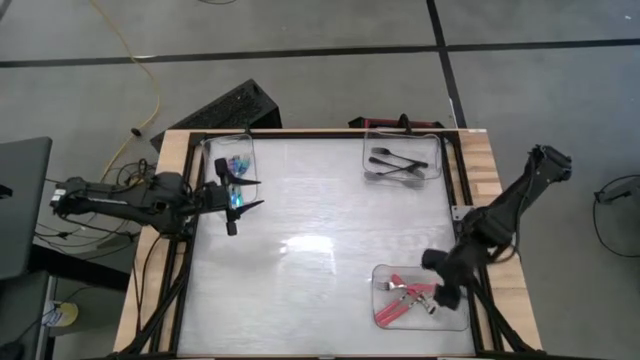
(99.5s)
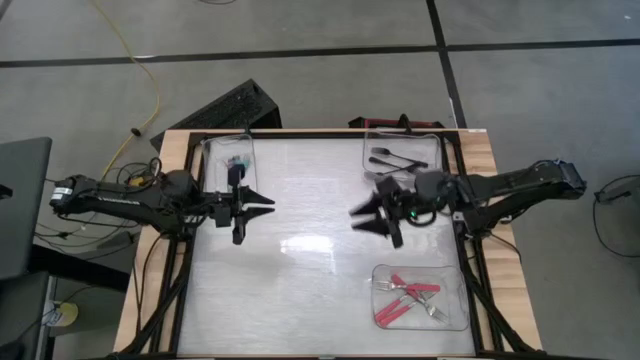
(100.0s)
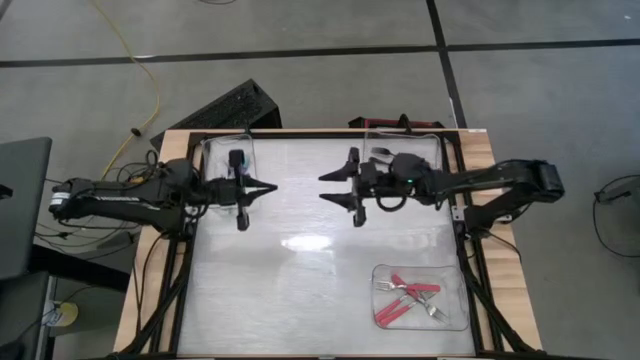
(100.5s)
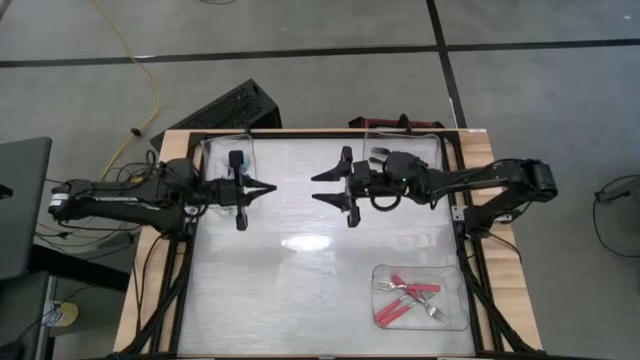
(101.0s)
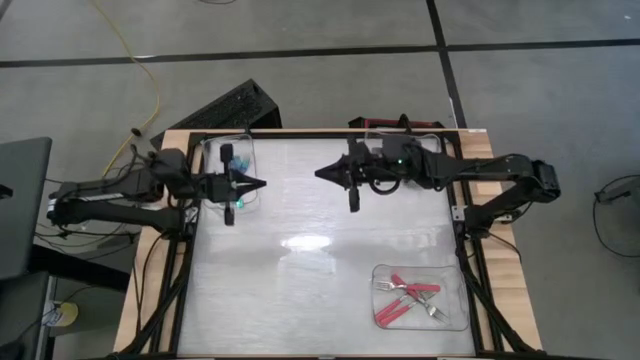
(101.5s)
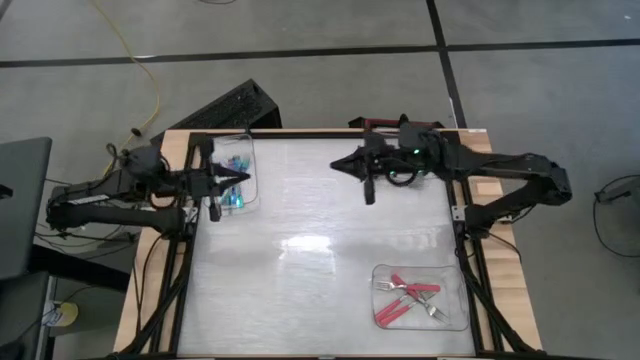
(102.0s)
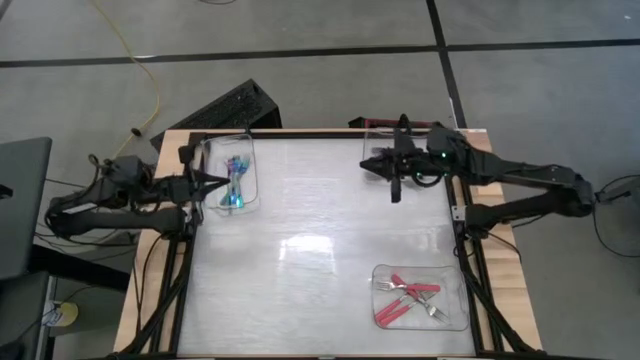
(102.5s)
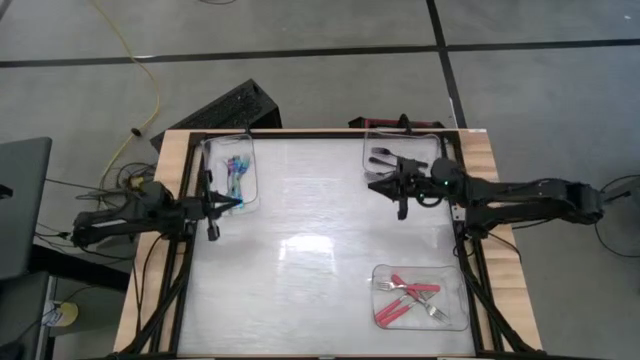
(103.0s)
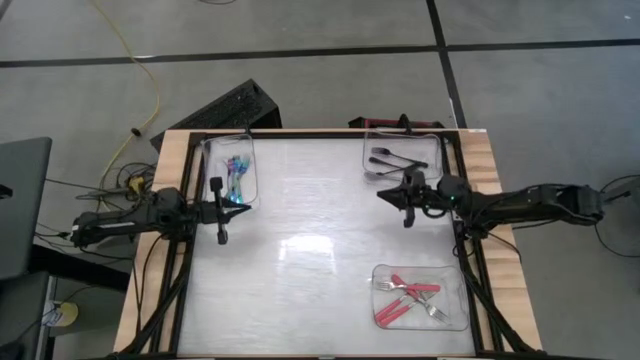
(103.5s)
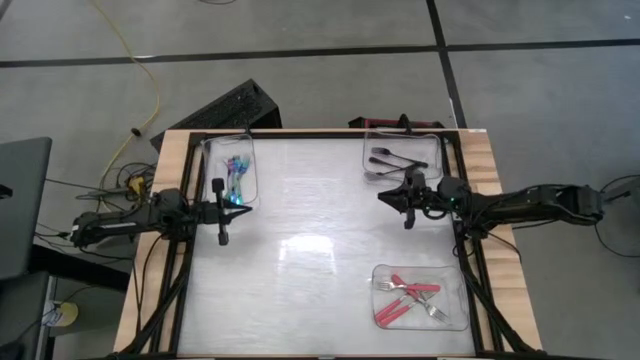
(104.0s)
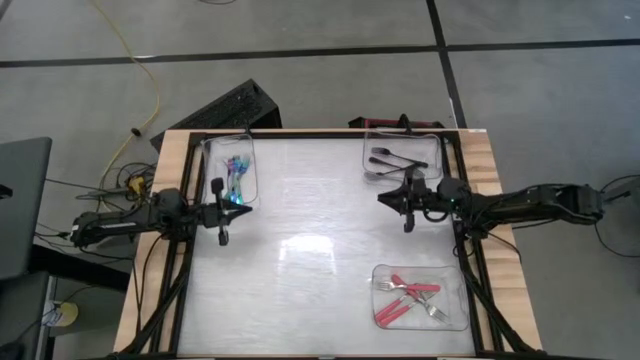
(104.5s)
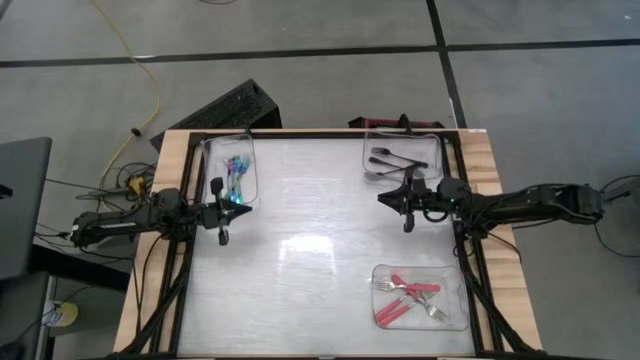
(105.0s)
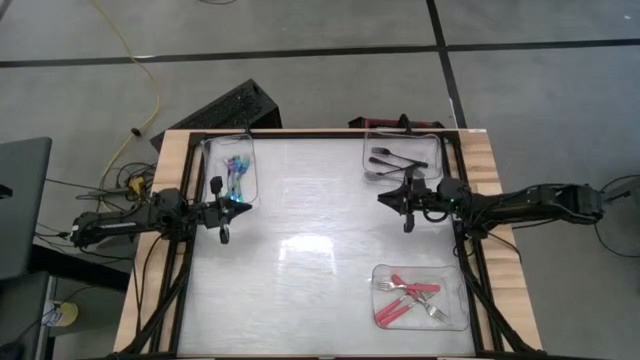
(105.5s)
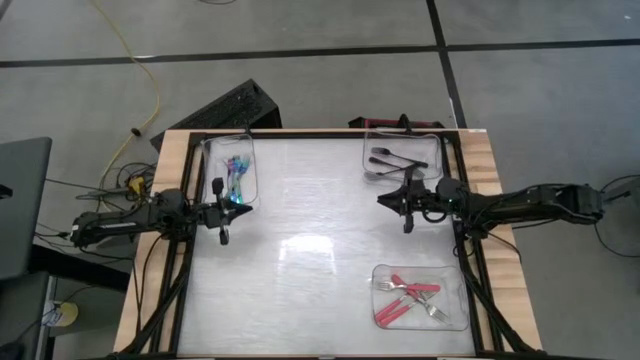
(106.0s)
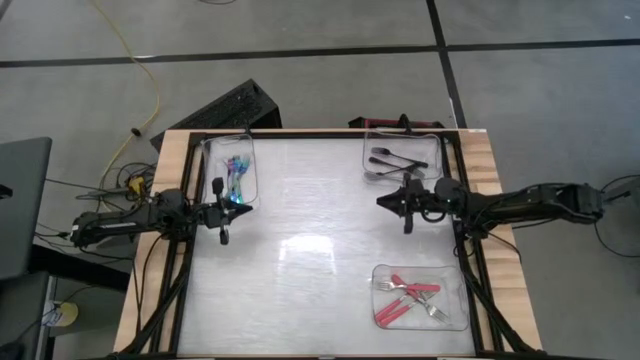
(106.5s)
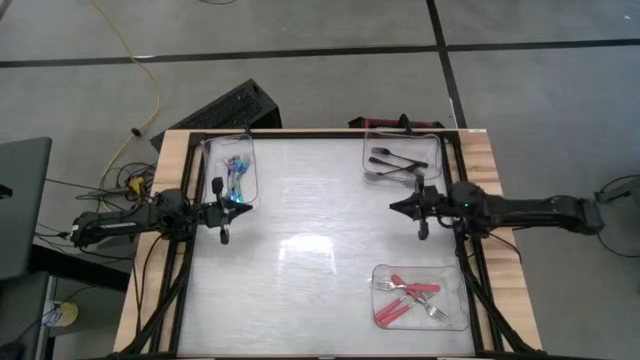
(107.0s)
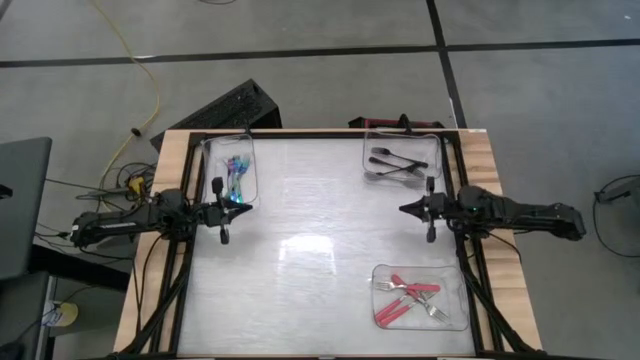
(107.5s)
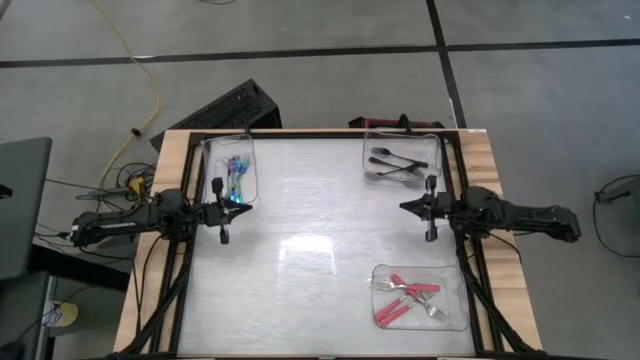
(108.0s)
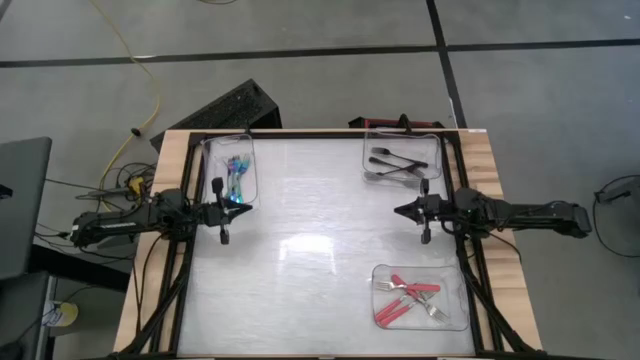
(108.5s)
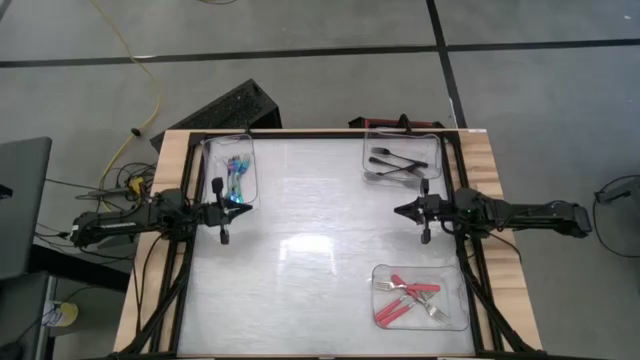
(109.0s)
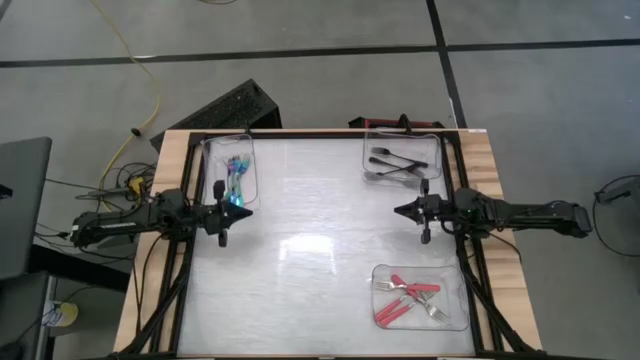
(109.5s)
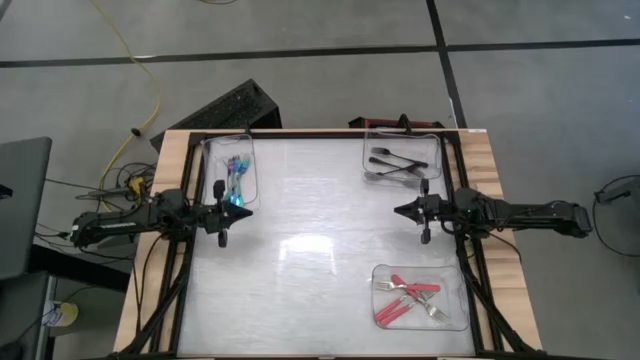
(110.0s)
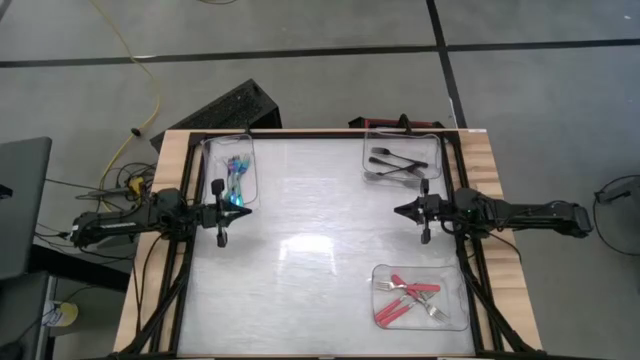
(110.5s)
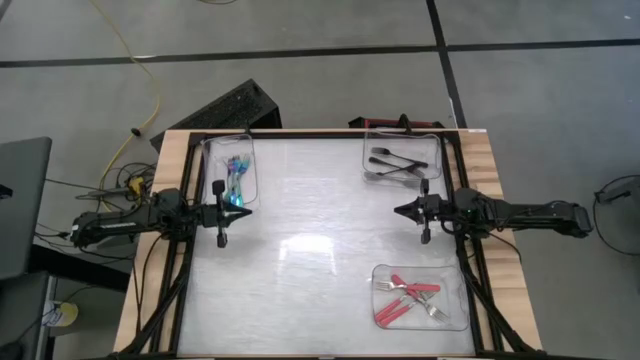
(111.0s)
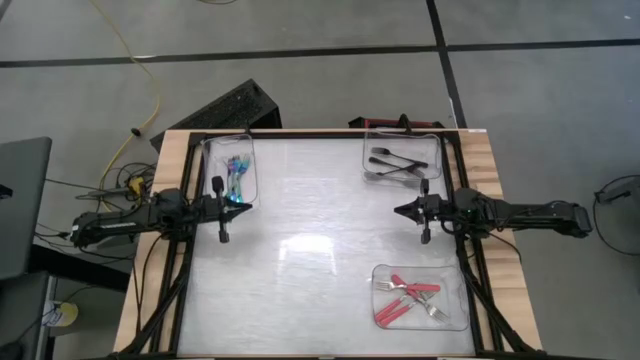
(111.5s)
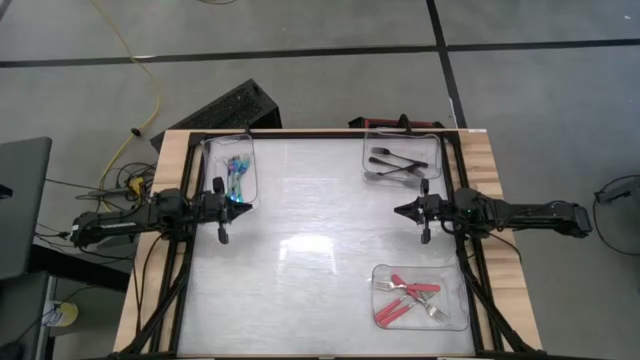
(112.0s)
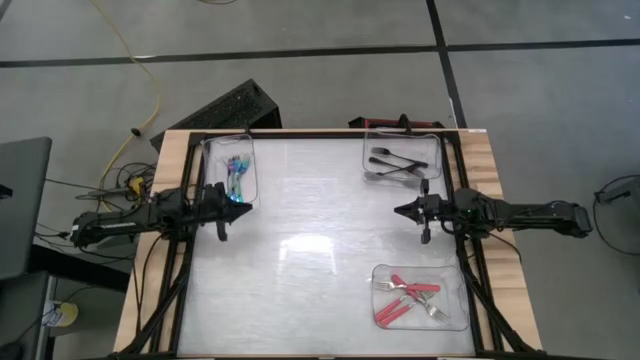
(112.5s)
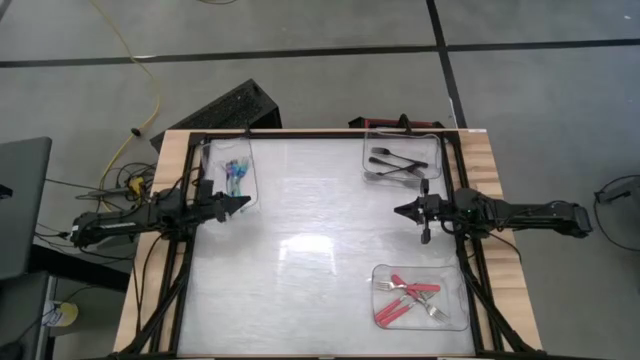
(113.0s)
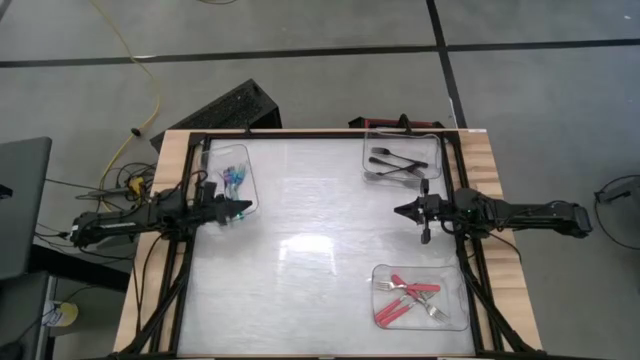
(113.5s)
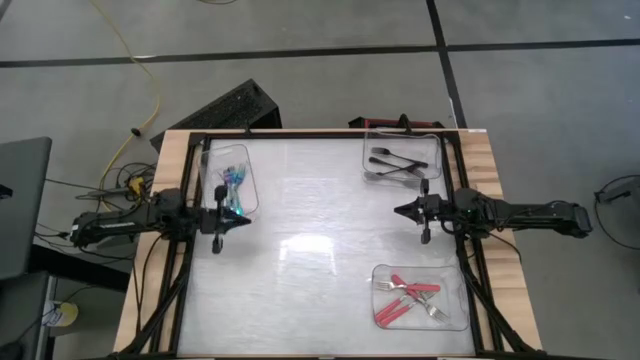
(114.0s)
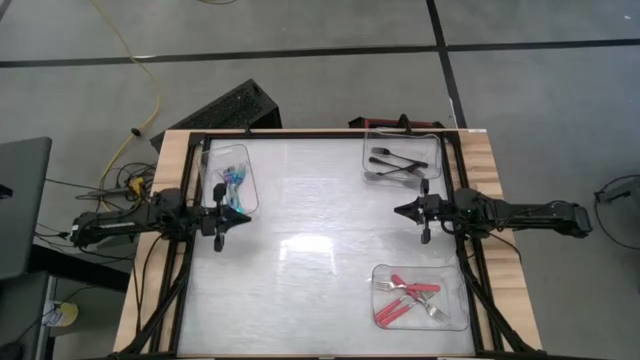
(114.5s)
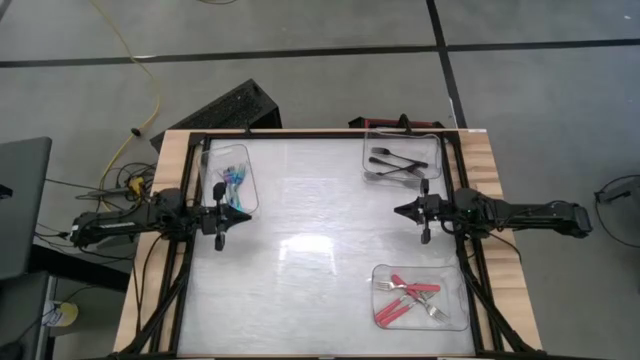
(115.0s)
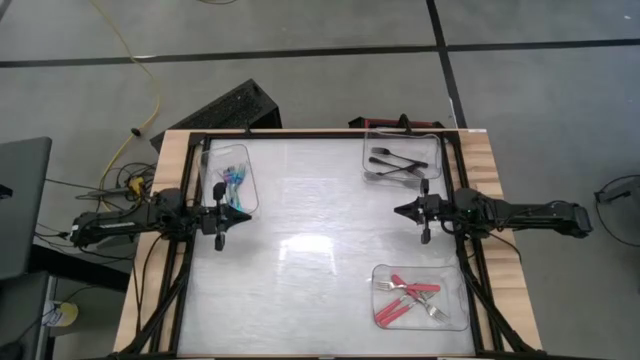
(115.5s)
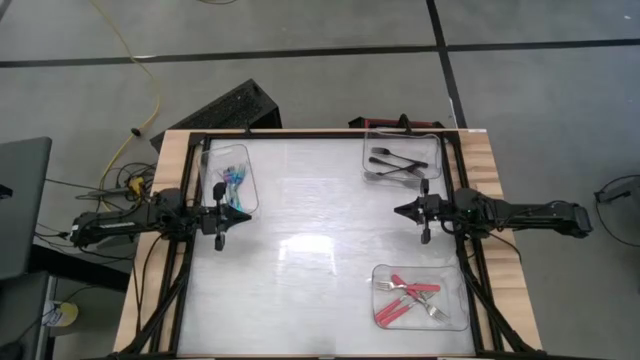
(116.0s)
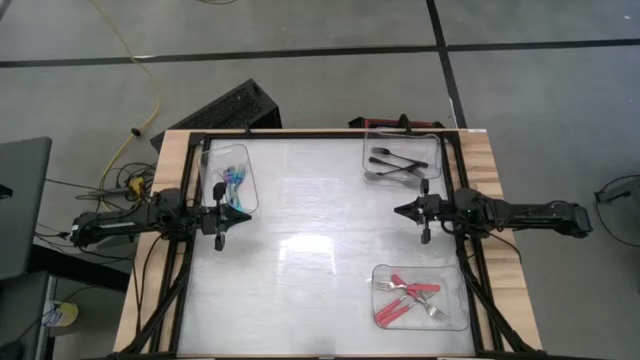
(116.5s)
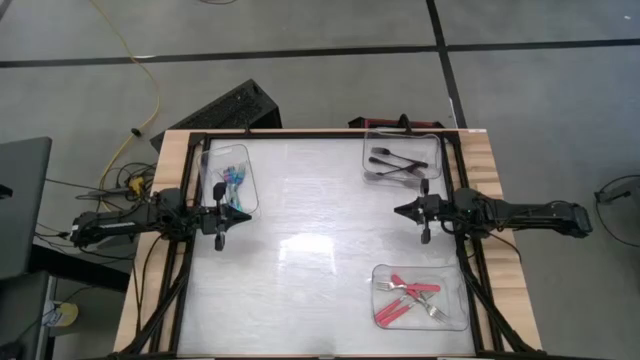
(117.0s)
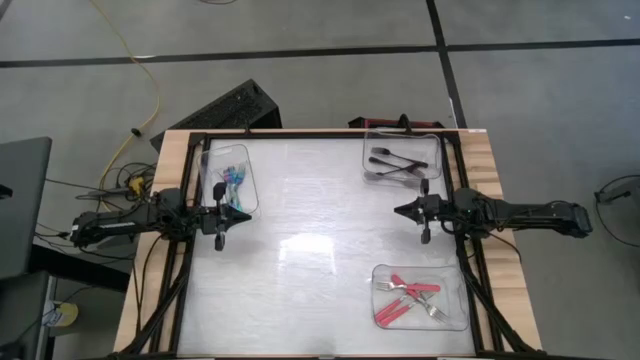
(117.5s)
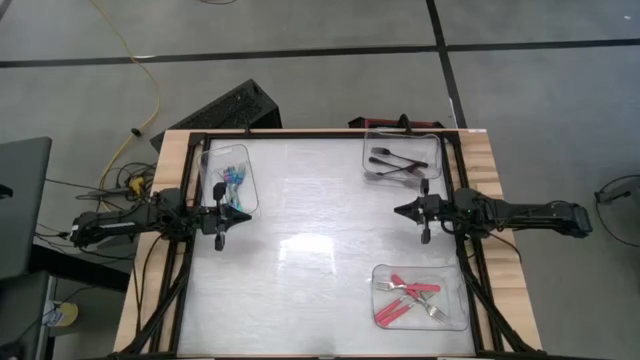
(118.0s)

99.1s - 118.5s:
Task: Sort silverware by color (type)
Return to Home Position

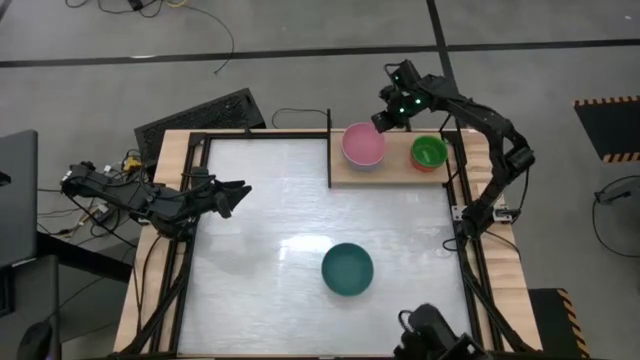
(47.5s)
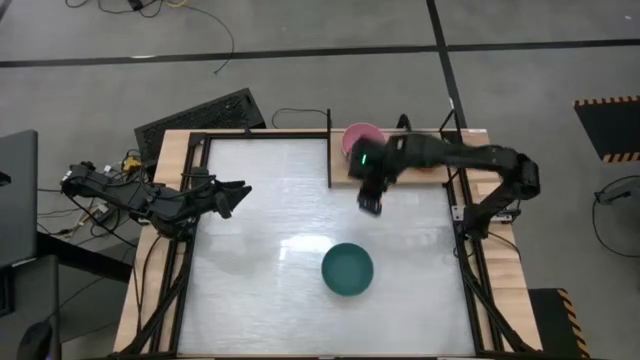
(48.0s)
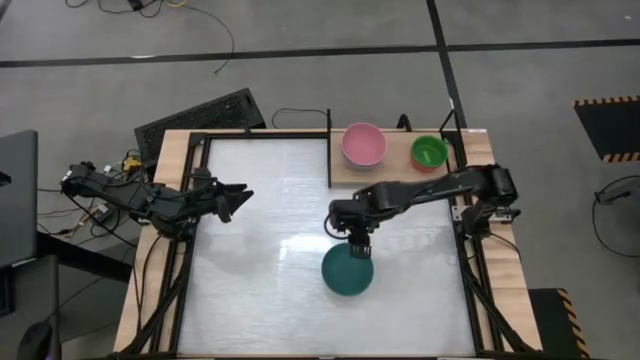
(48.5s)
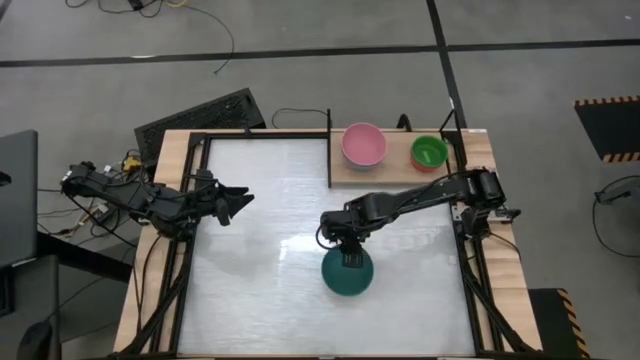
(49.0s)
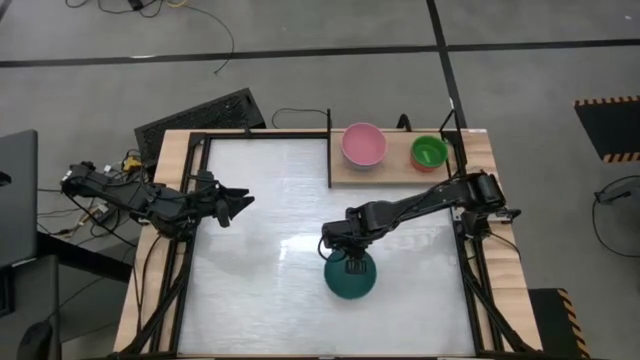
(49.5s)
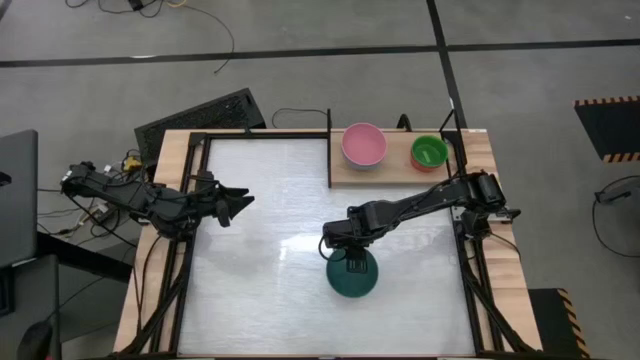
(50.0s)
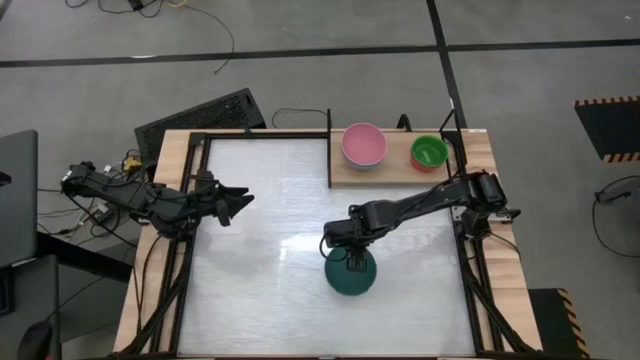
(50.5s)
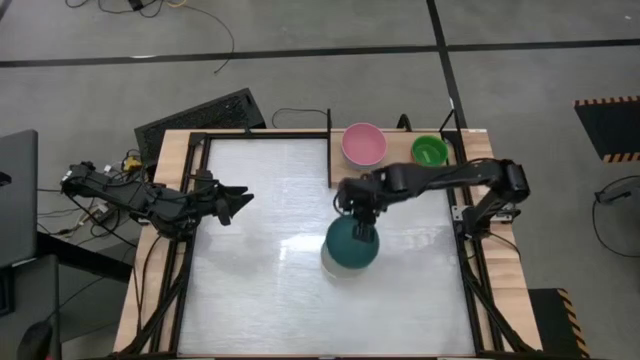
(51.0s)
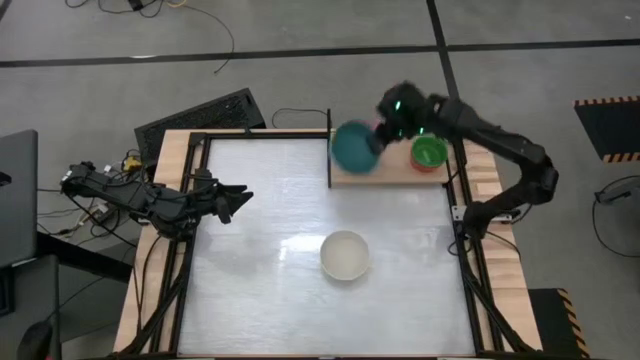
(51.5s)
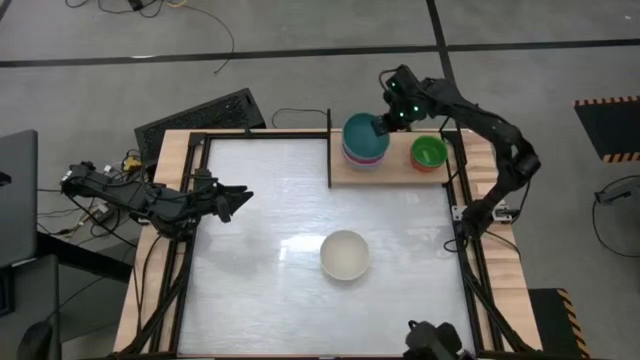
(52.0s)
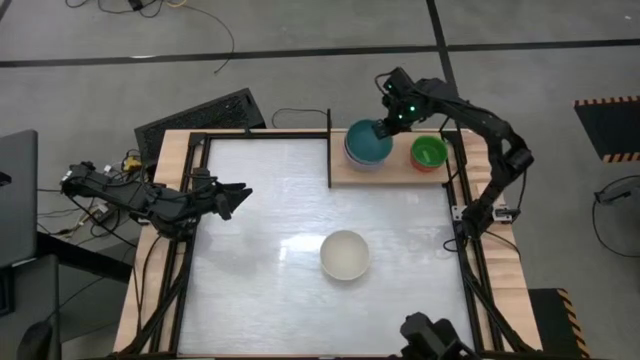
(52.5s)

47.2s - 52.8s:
Task: Place and stack bowls onto a shelf
Stack the green bowl on top of the pink bowl on the shelf
